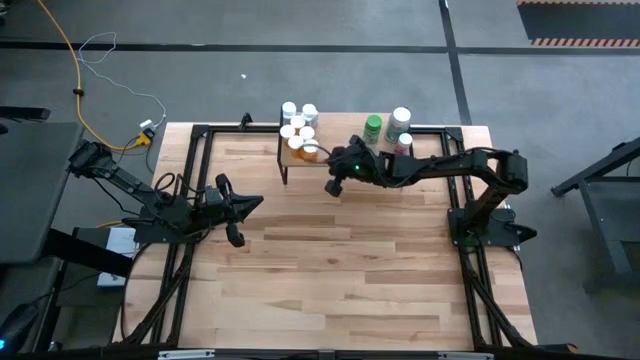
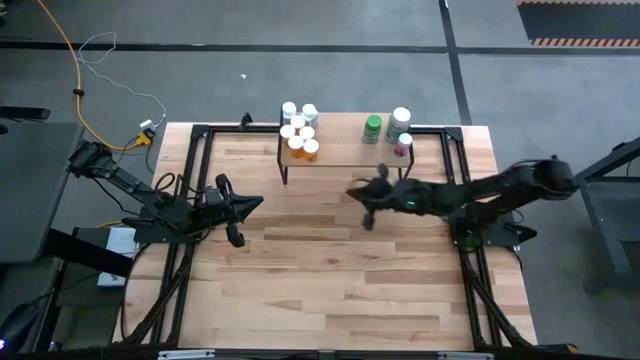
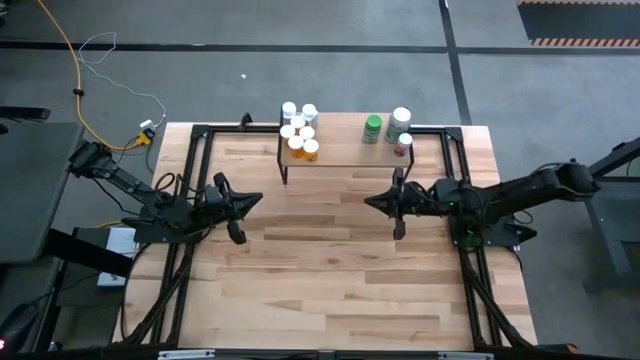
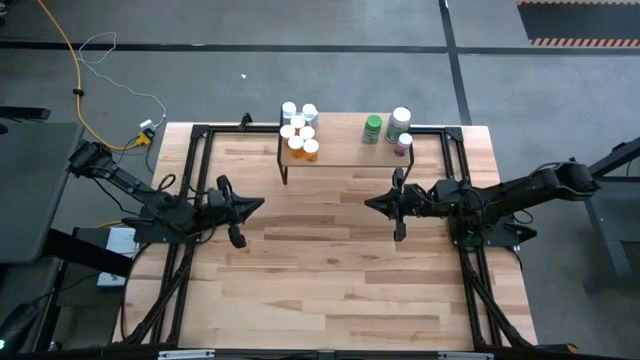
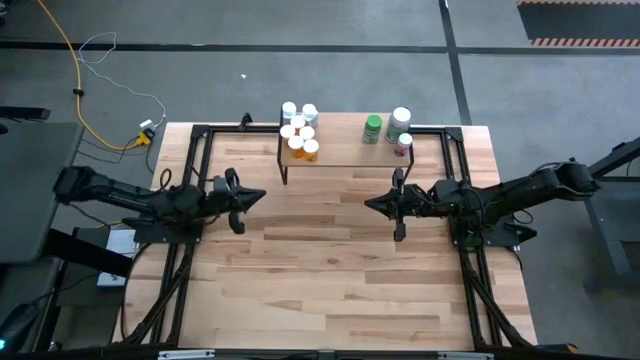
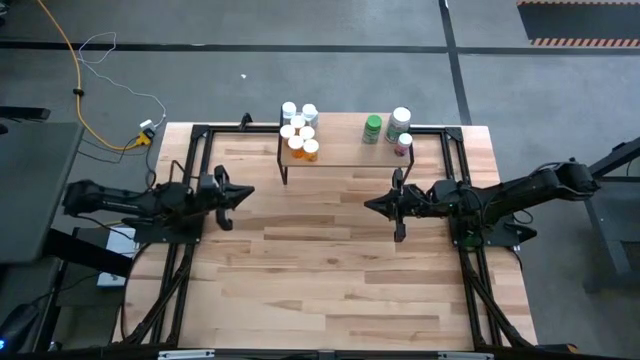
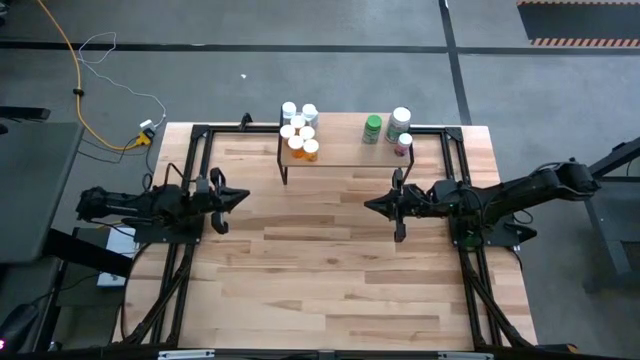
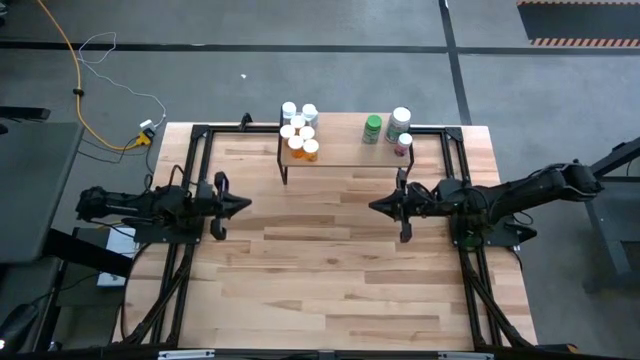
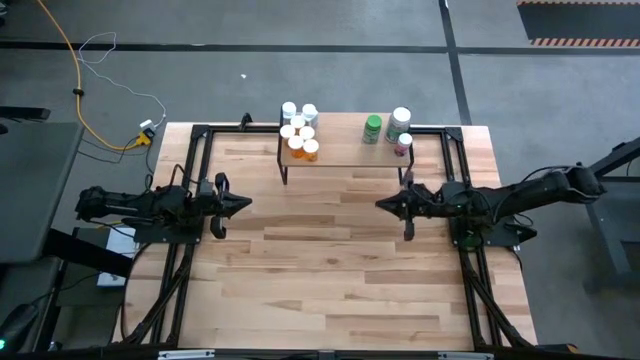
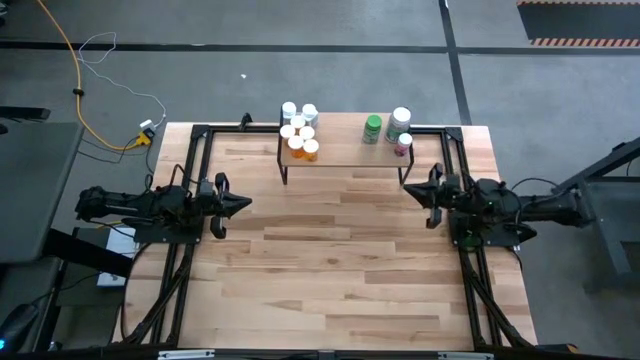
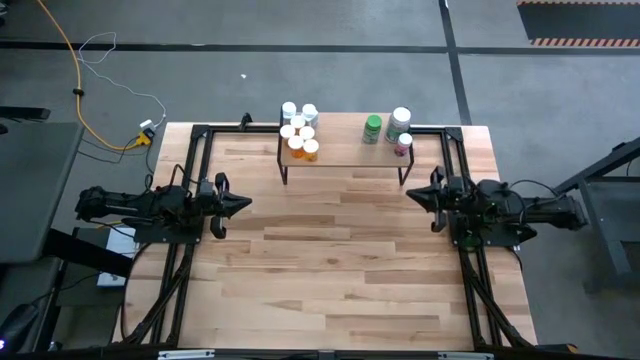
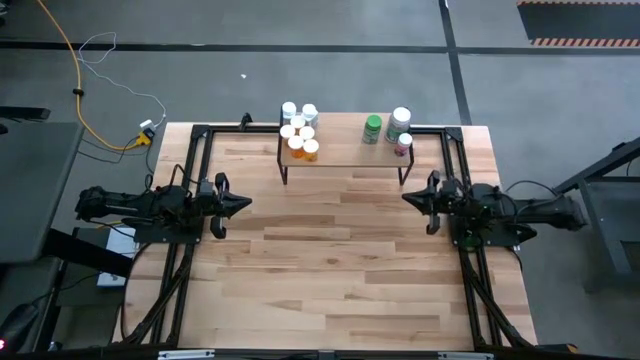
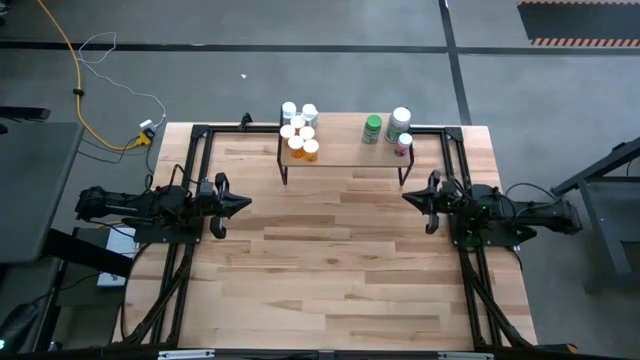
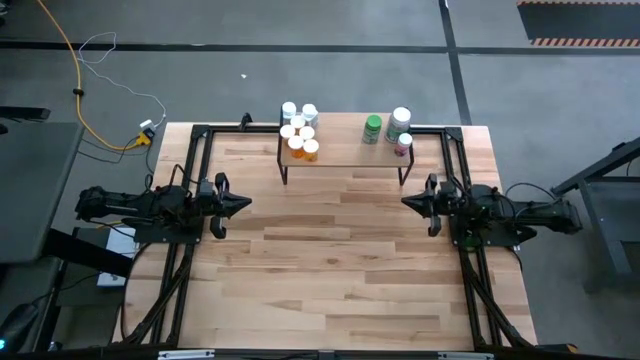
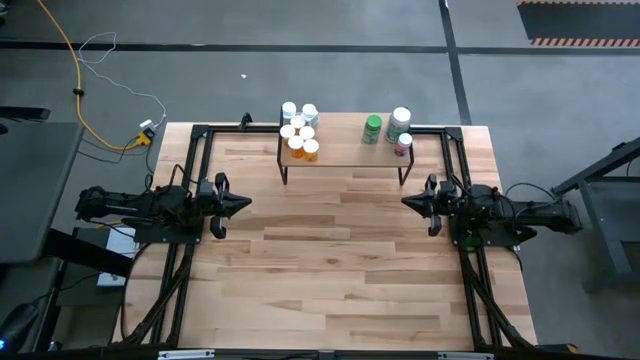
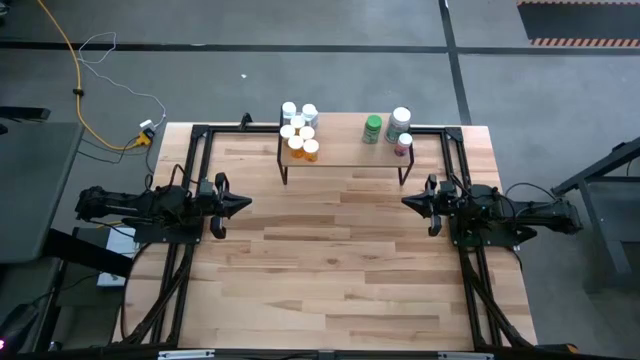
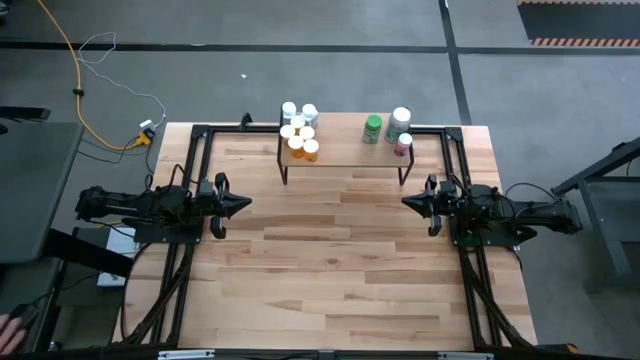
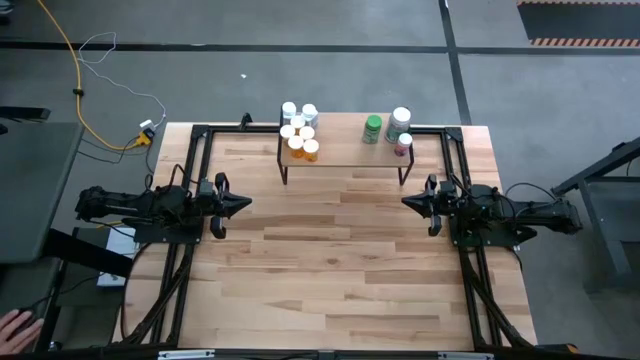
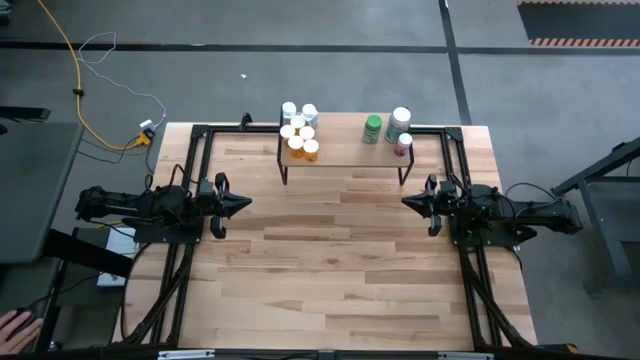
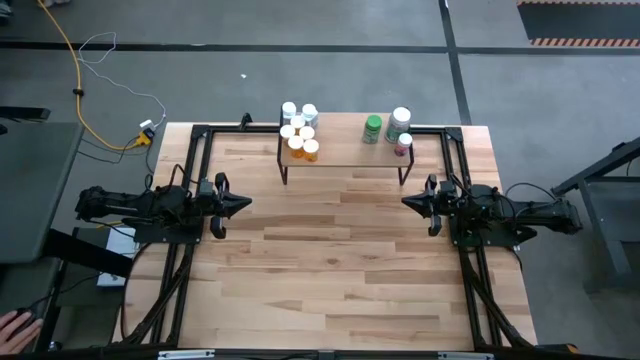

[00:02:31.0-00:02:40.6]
Task: Pick and place medicine bottles onto shelf by color
Return to Home Position

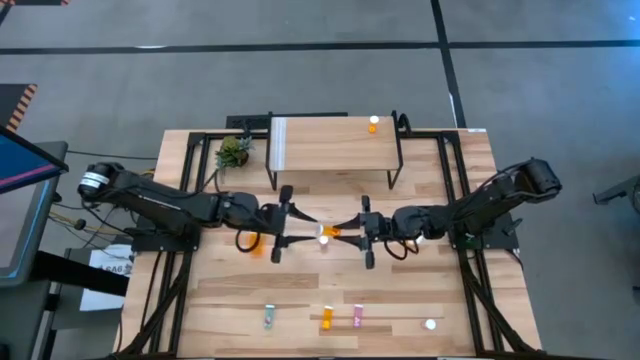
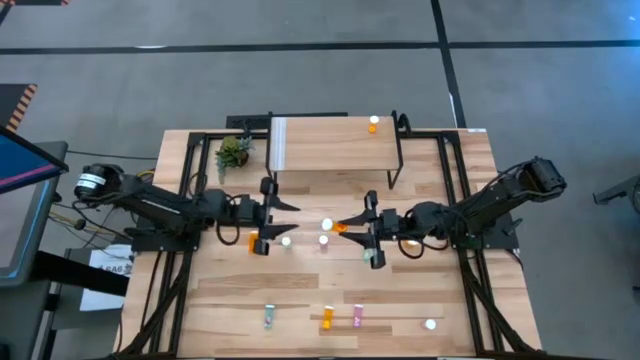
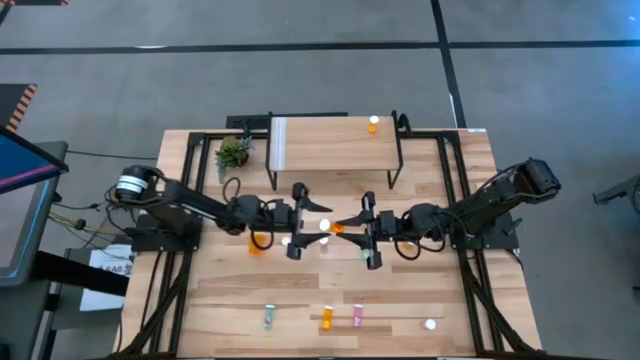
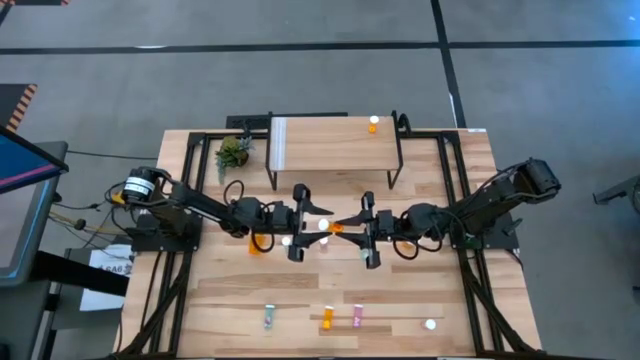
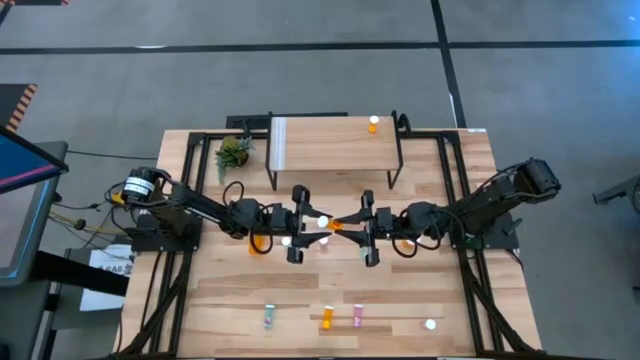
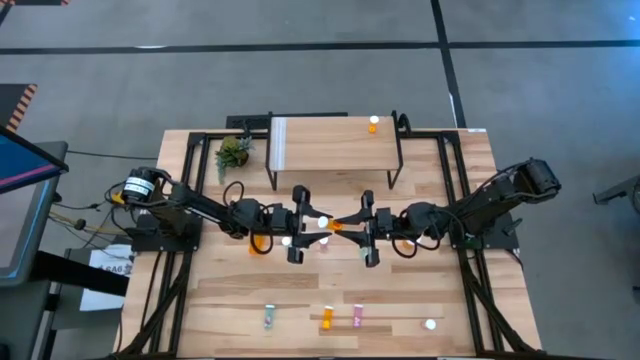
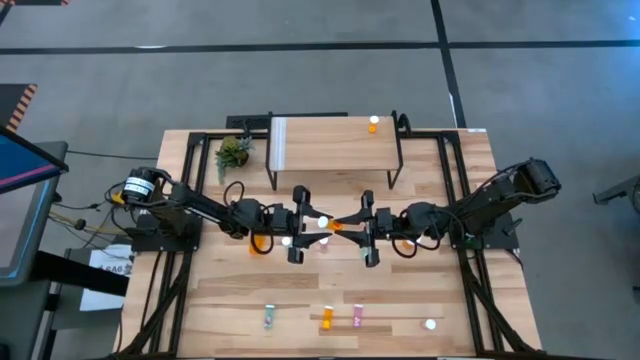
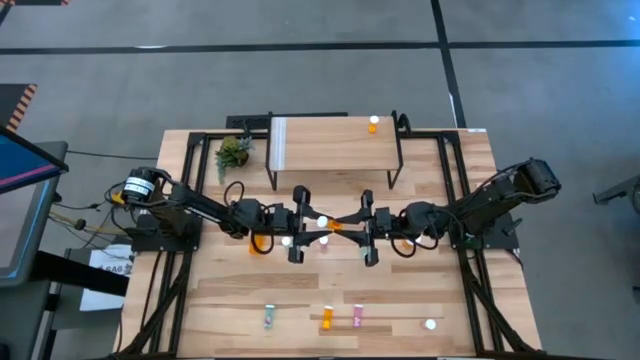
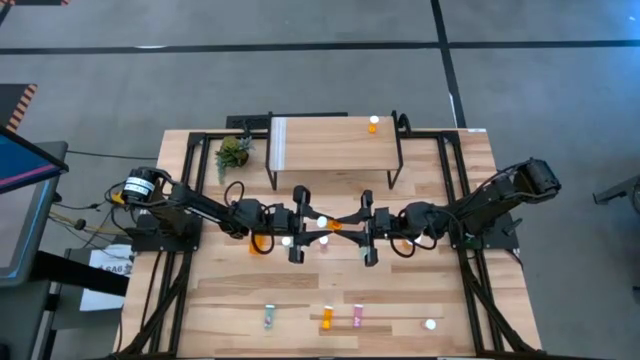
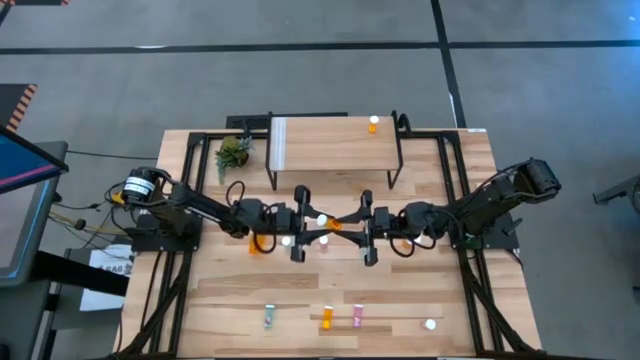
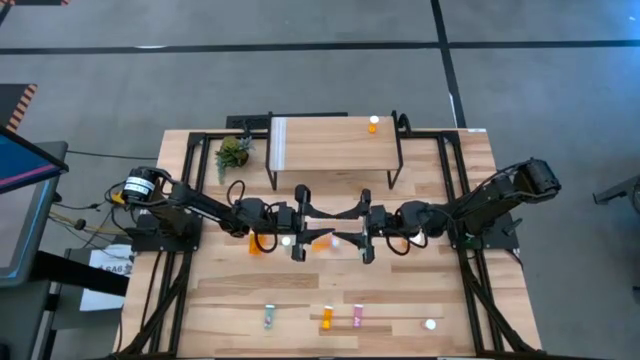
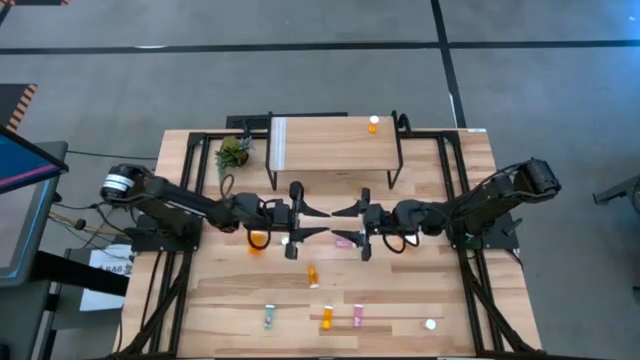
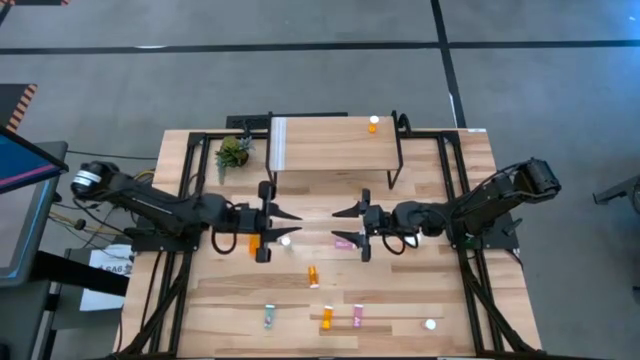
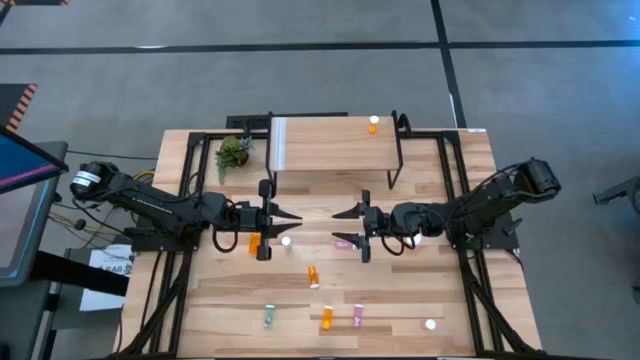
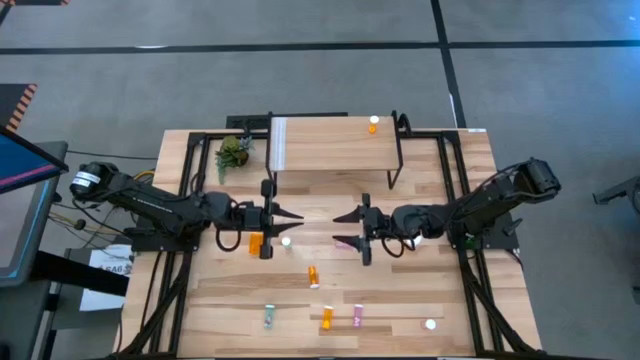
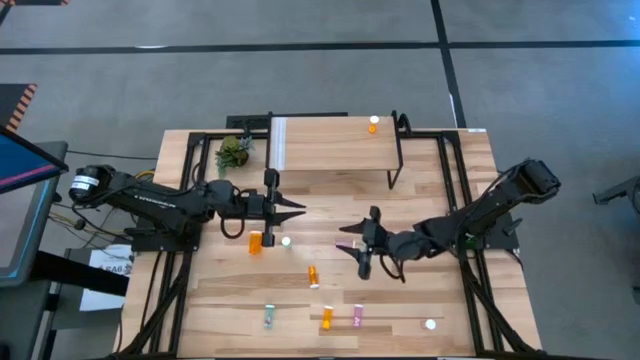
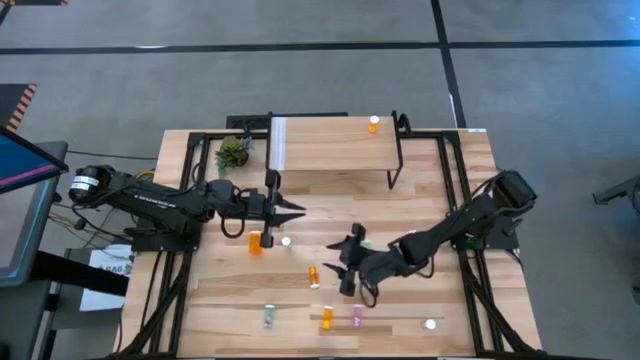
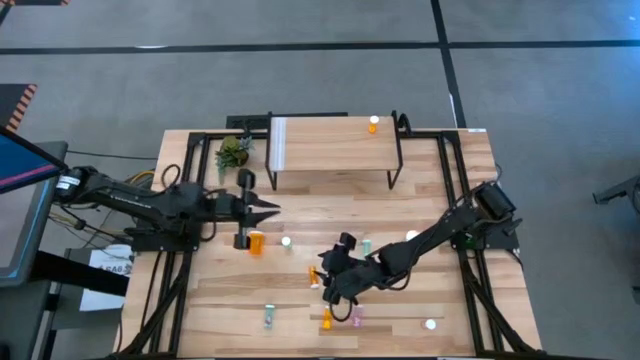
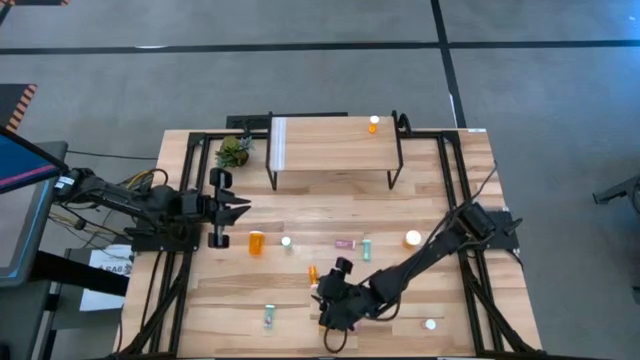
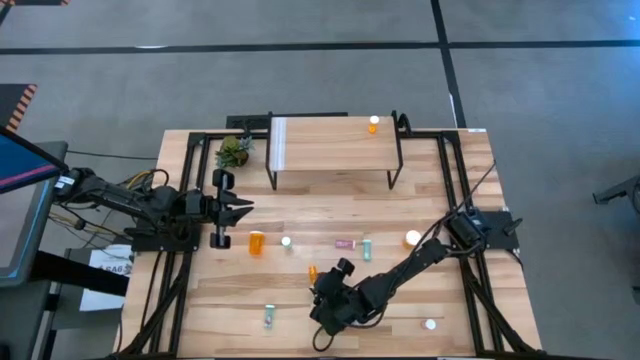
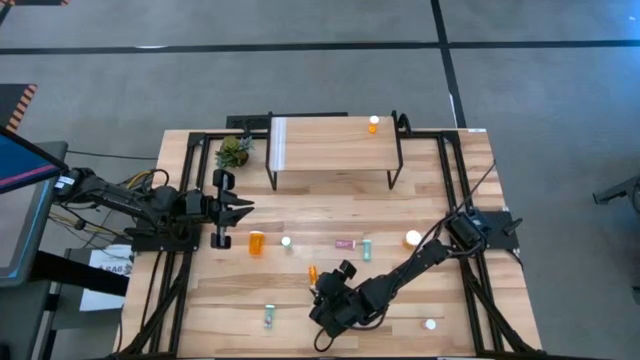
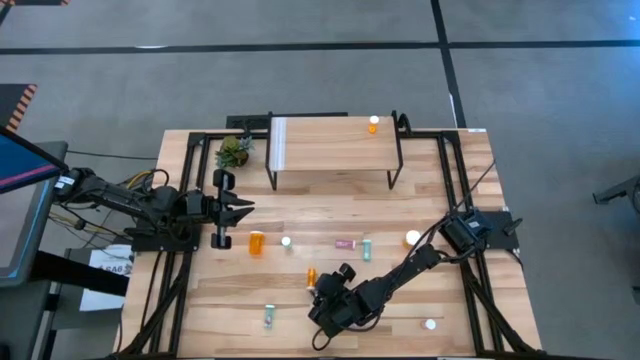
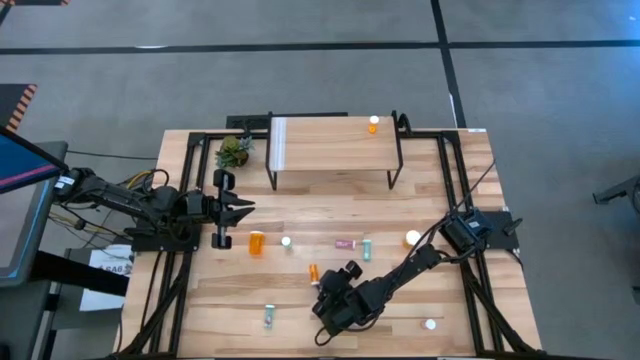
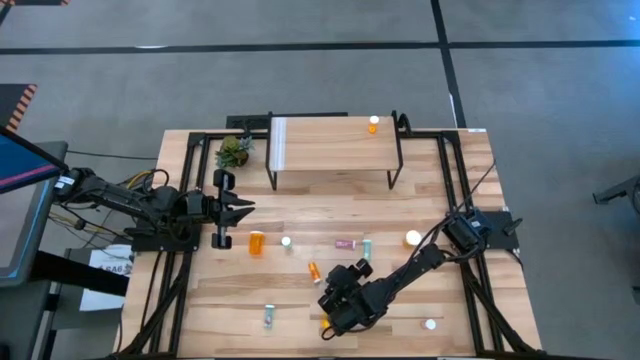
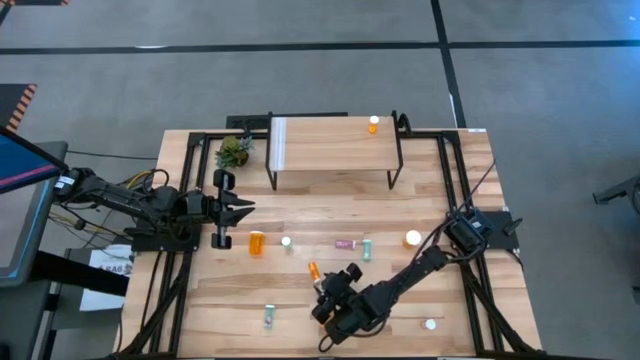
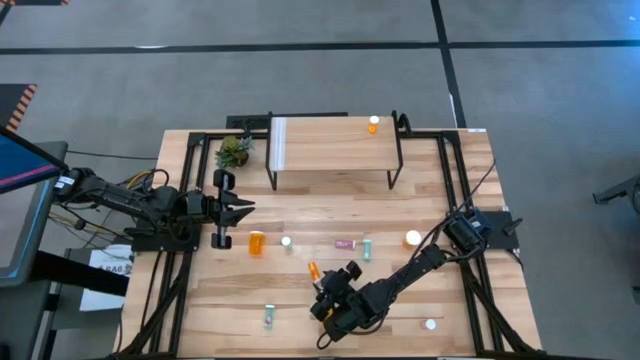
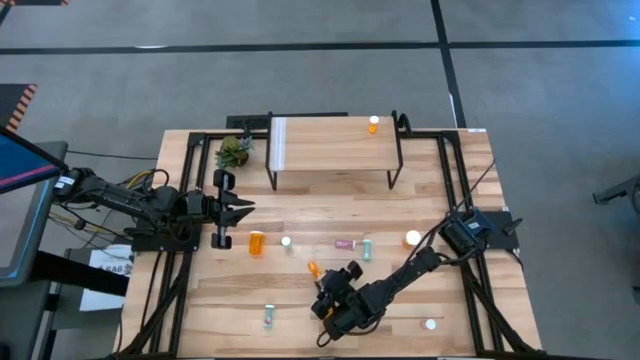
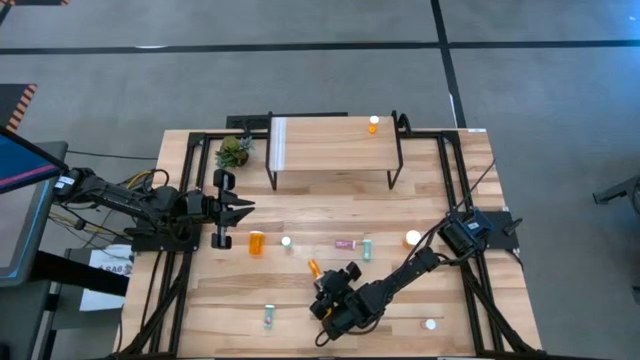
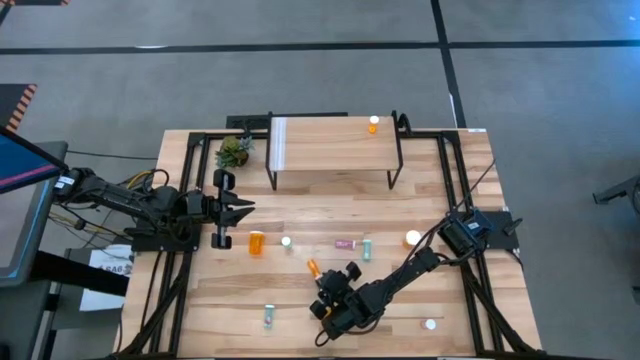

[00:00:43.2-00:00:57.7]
Task: Pick and place medicine bottles onto shelf by color
Put the left small orange pill bottle on the shelf aligned with the other small orange pill bottle
